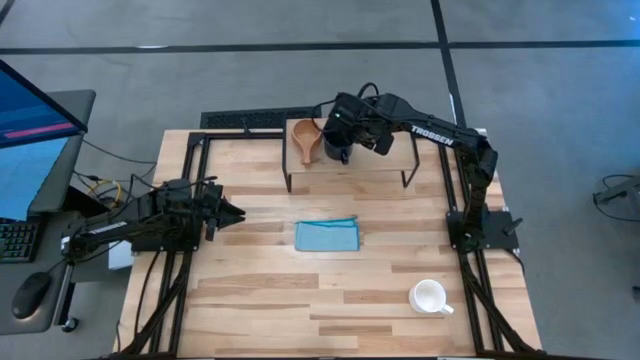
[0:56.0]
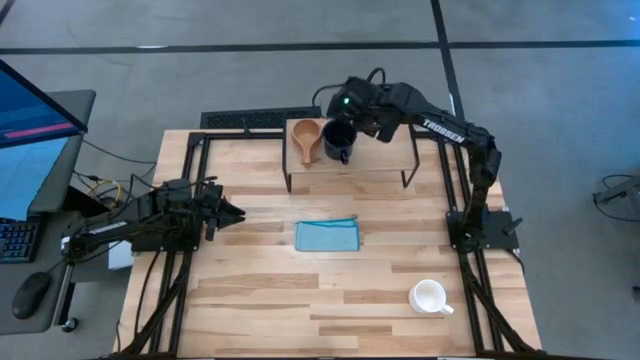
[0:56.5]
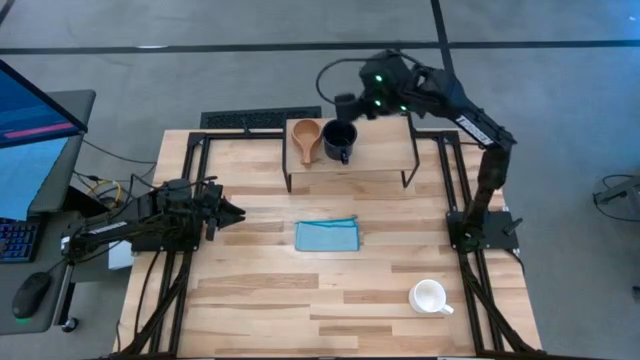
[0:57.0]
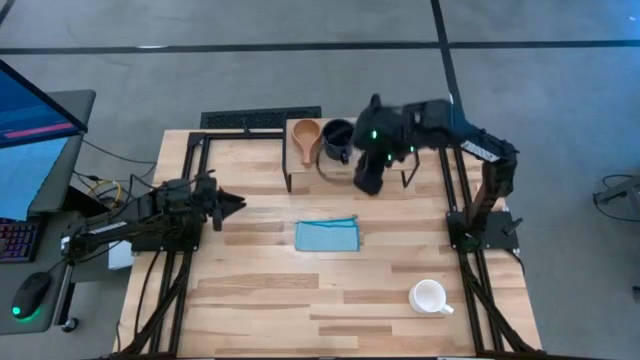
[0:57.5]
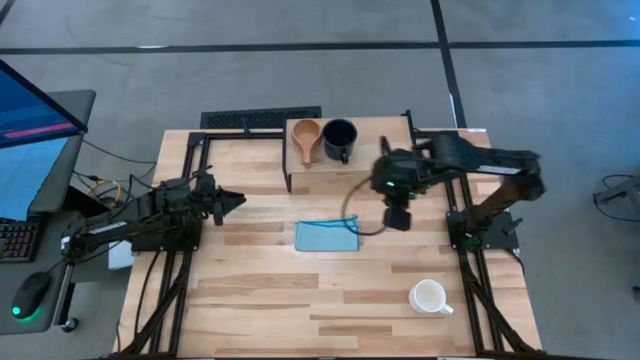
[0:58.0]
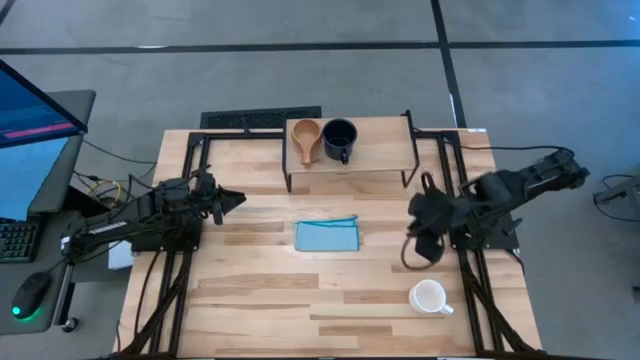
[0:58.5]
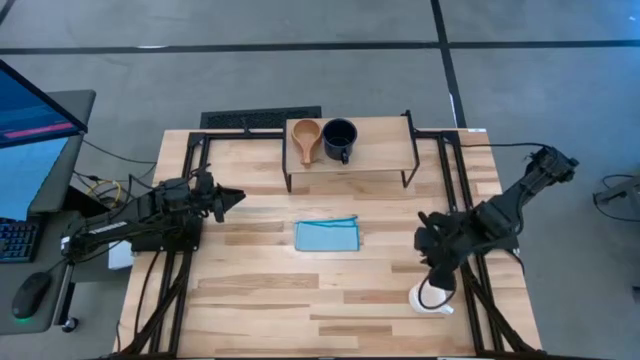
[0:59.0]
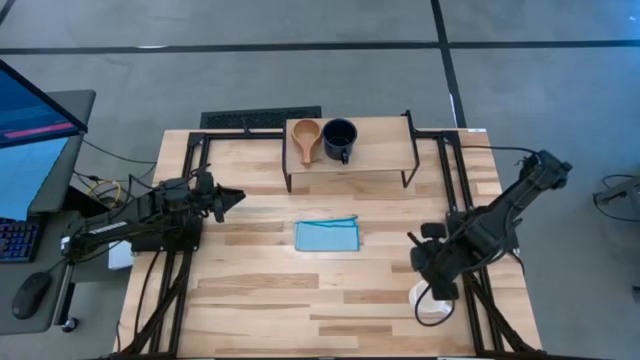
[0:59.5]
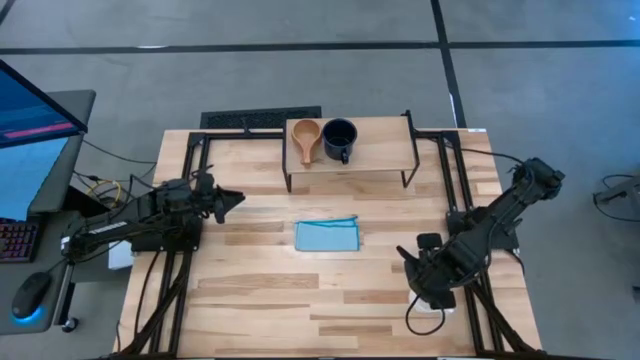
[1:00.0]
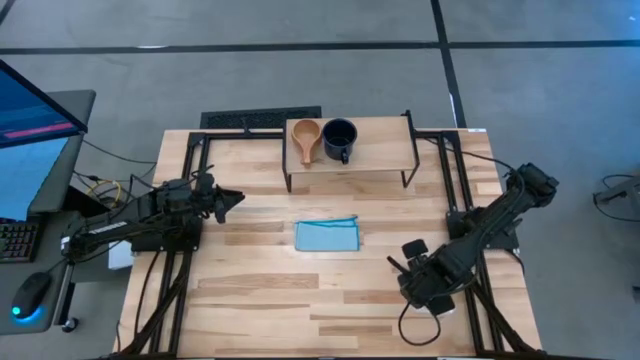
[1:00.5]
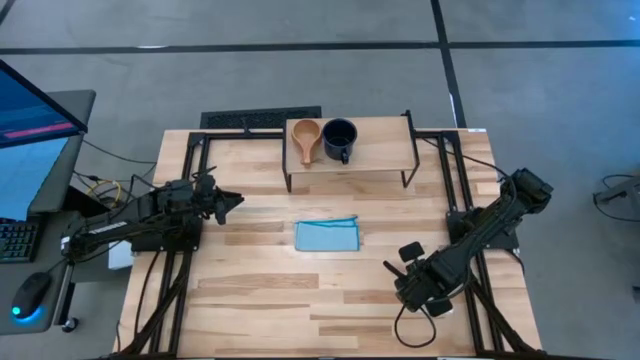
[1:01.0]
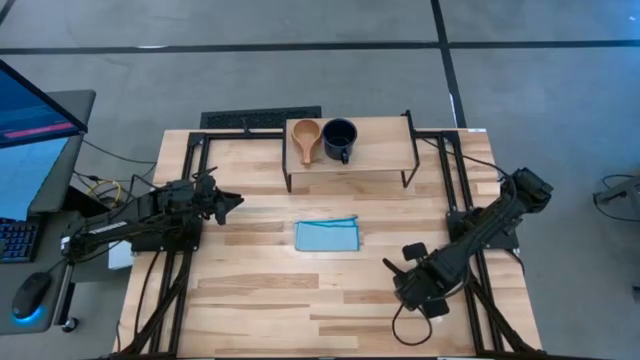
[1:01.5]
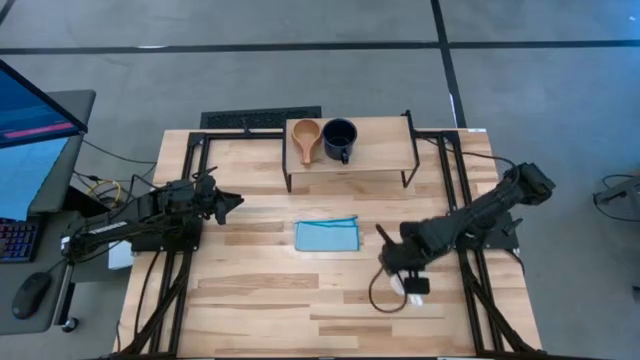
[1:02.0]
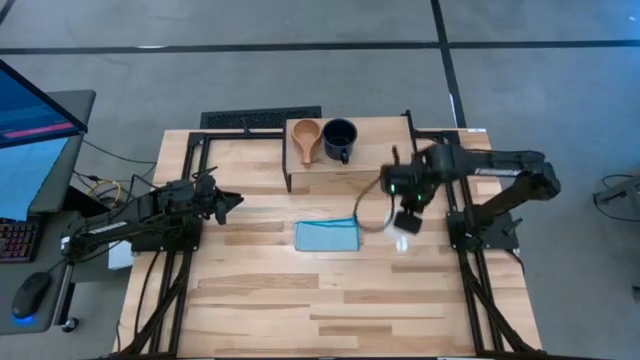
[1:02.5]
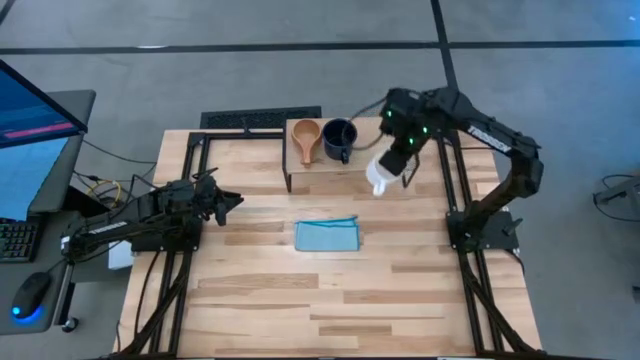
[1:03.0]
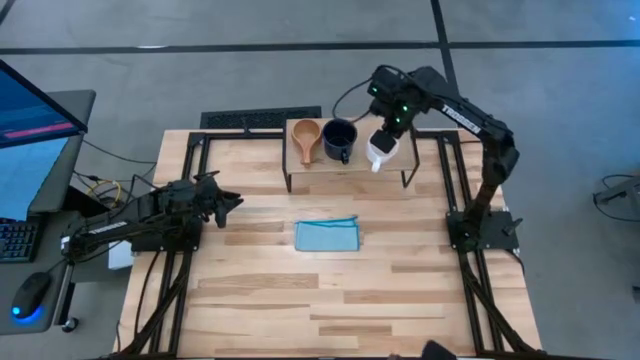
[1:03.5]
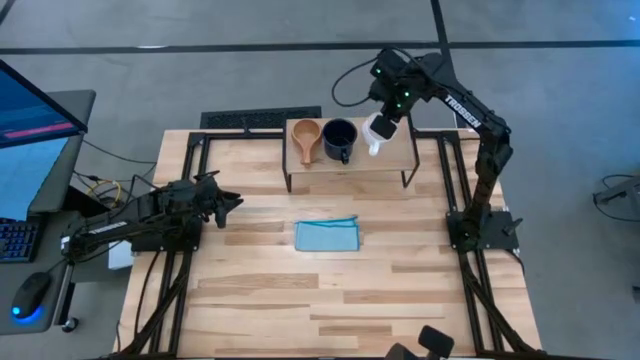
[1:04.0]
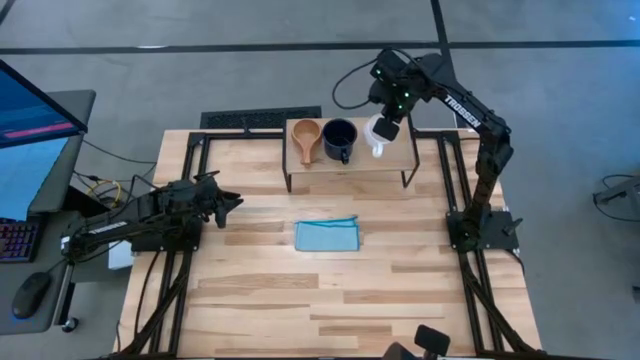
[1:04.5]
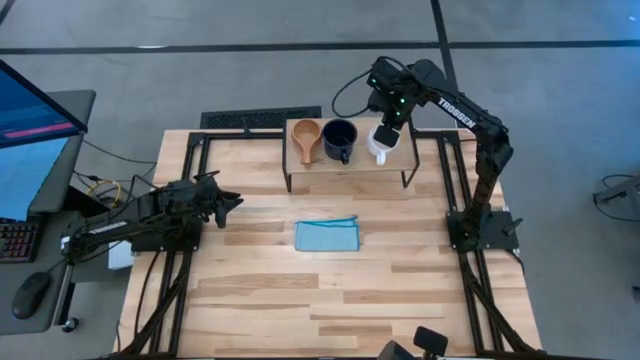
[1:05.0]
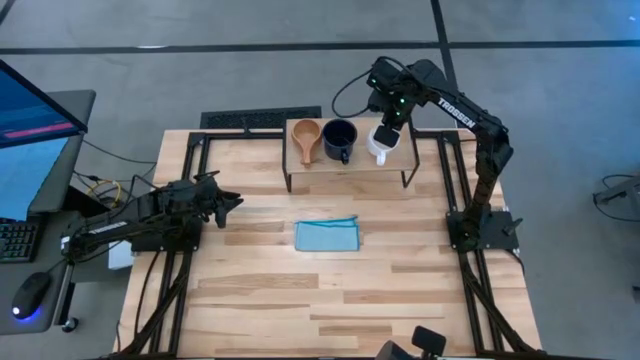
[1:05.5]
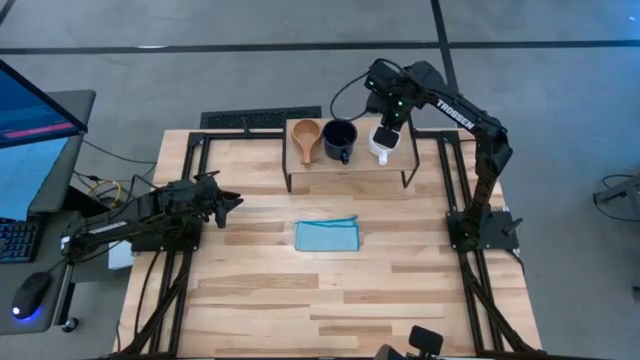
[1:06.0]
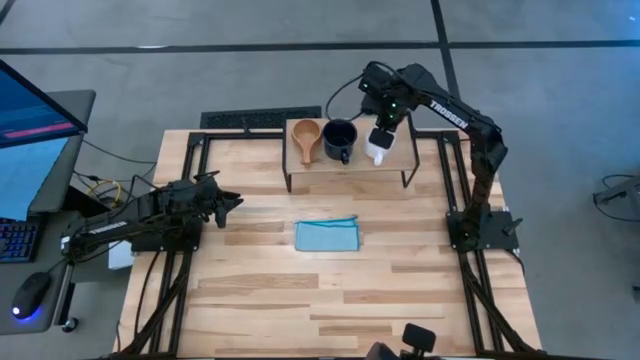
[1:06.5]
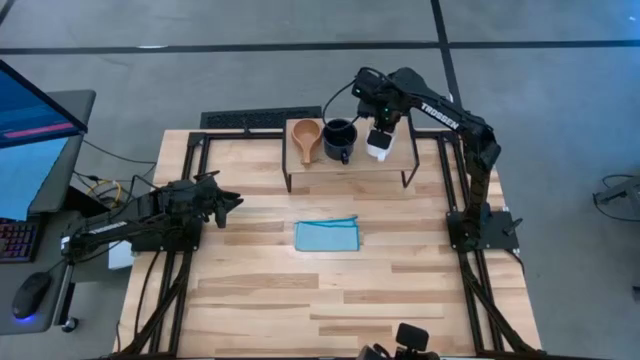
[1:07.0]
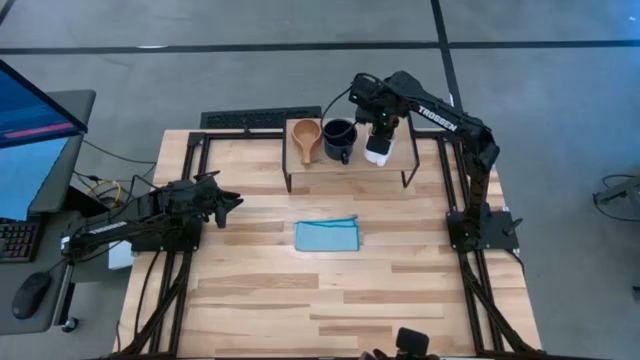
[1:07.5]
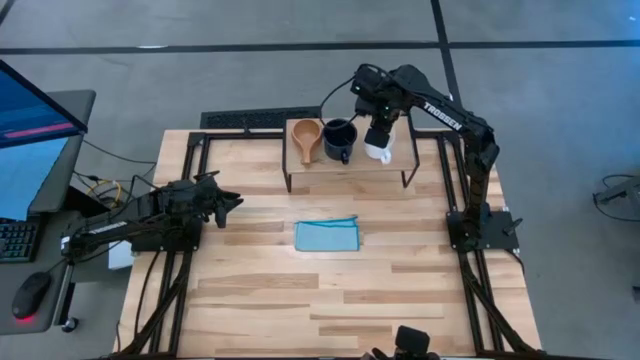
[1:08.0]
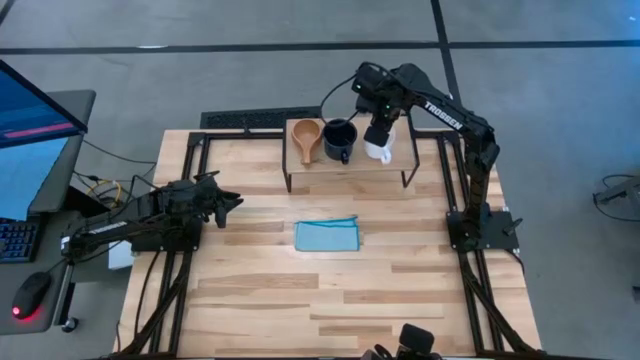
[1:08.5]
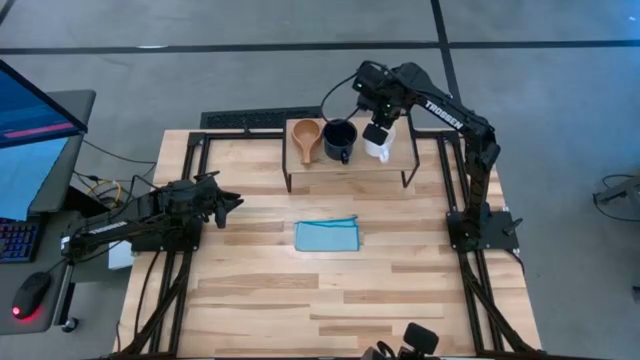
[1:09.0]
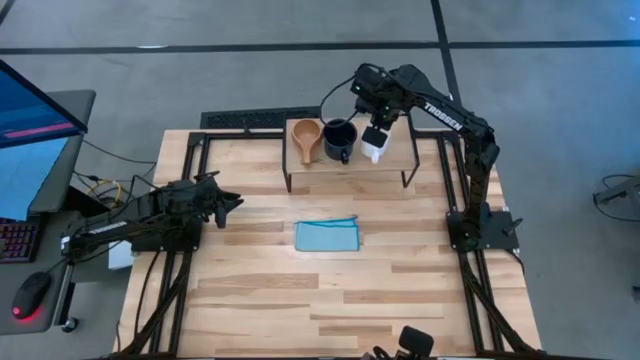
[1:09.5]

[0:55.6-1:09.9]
Task: Stack small to large cups/mugs on shelf
Put the white mug on the shelf

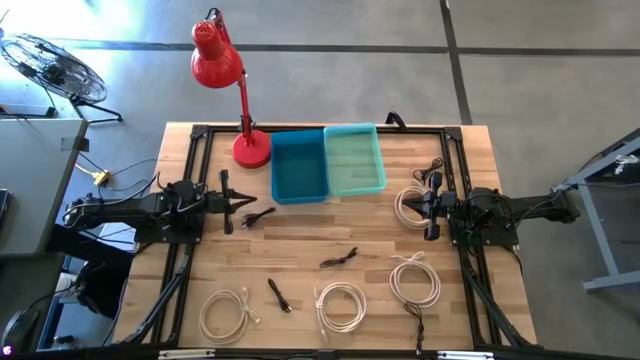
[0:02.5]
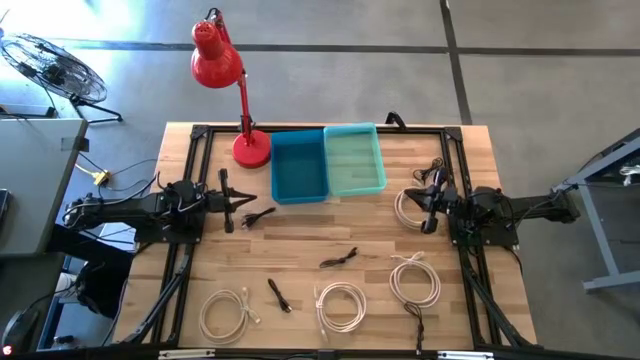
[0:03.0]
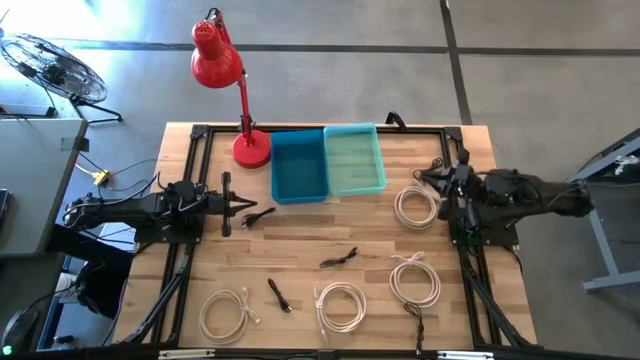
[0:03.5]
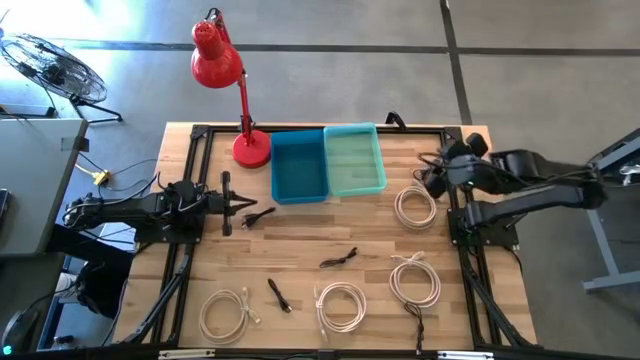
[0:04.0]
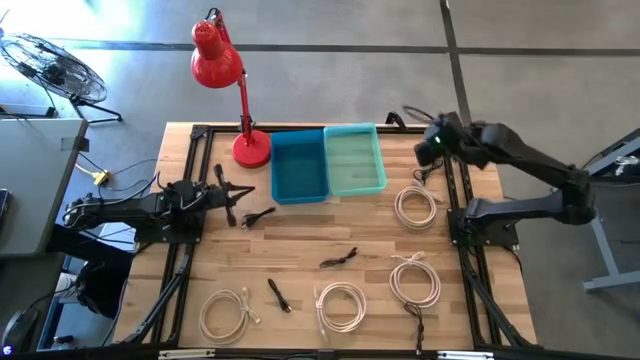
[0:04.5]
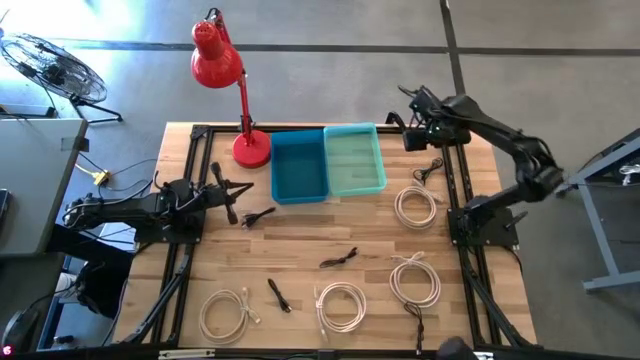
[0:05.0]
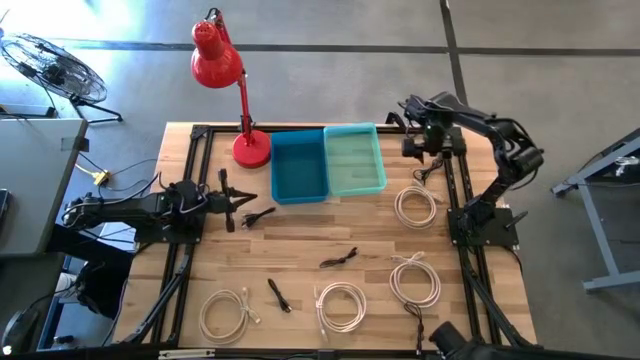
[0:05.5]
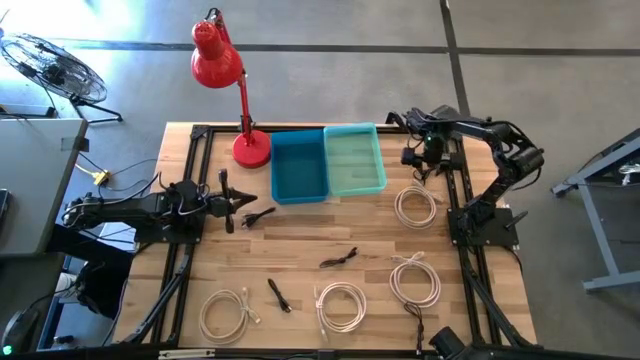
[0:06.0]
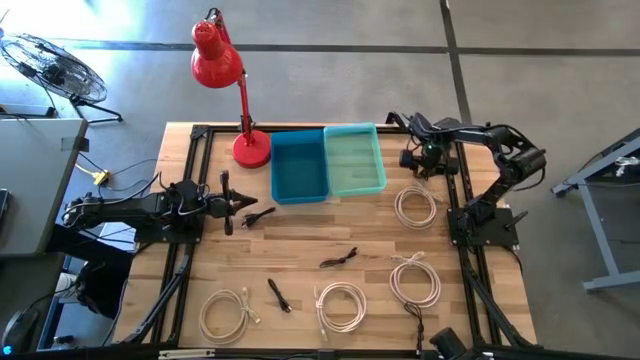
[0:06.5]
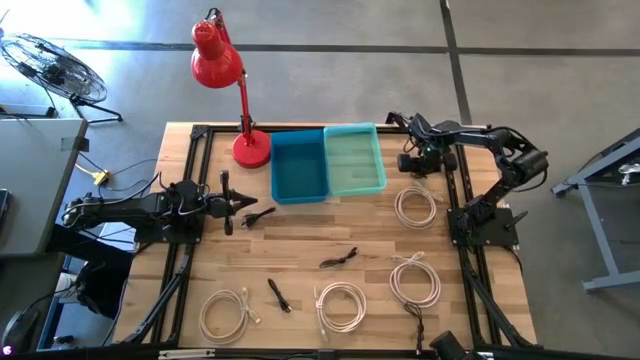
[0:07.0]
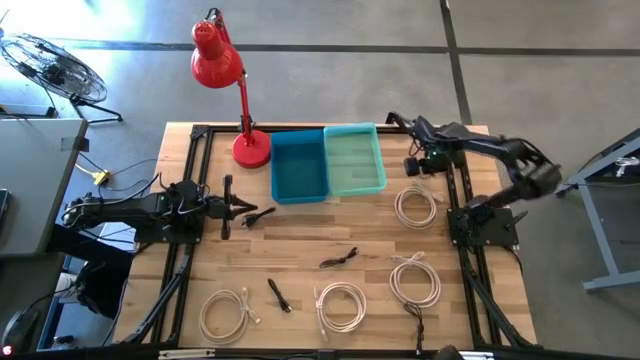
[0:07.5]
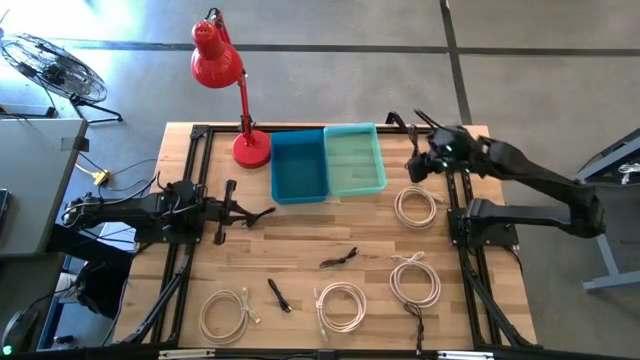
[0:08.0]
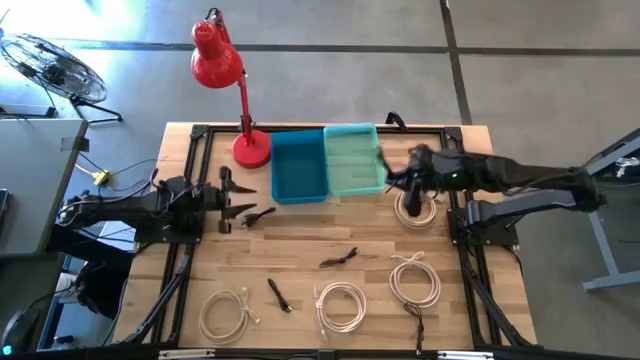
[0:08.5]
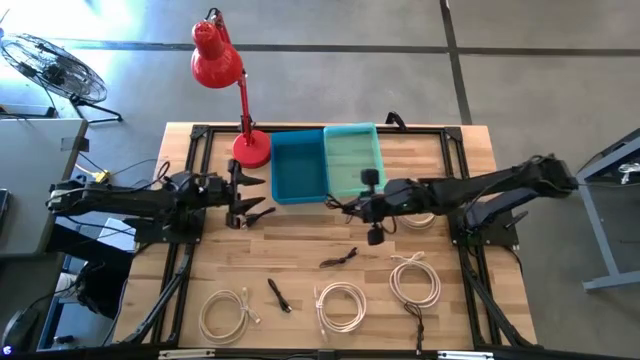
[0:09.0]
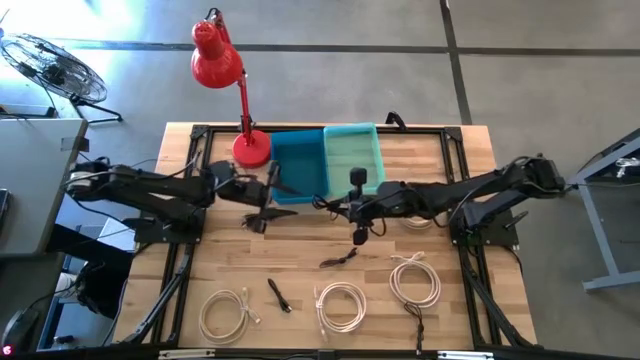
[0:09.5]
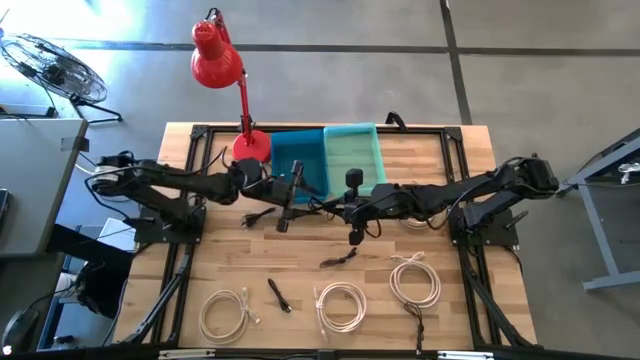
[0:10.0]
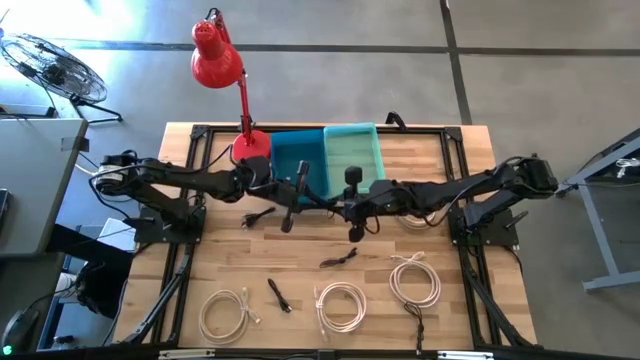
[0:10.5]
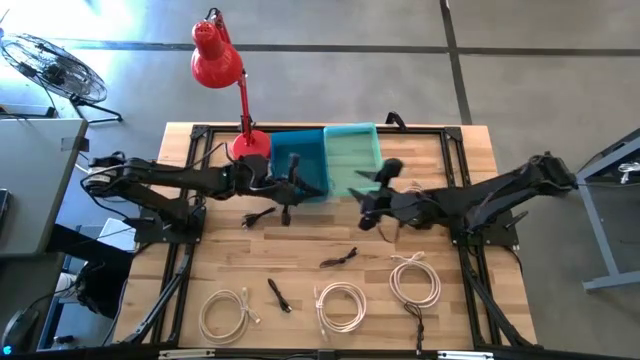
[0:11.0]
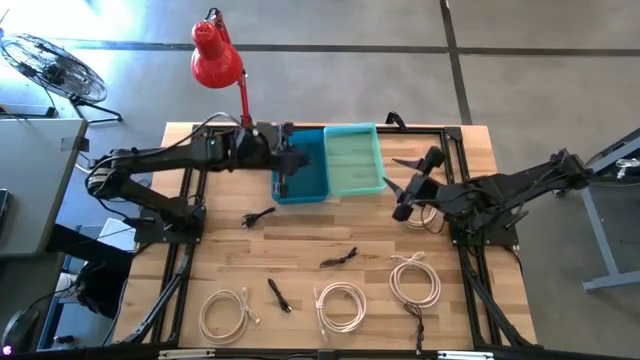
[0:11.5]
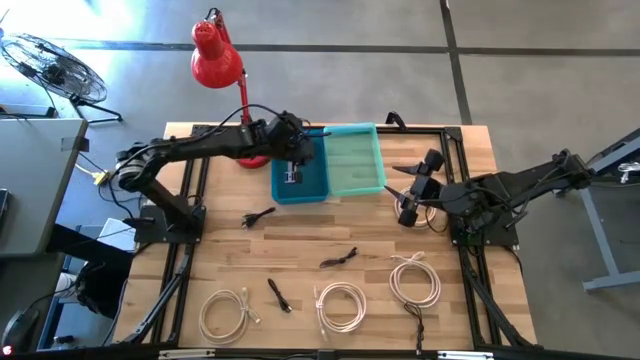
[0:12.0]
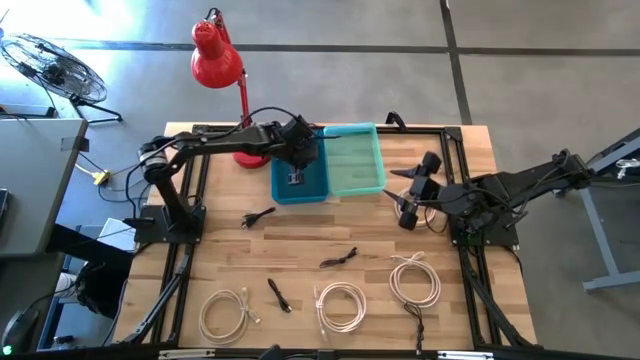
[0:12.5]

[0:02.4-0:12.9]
Task: Pick & Place USB Port
Put the black usb cable into the blue bin
